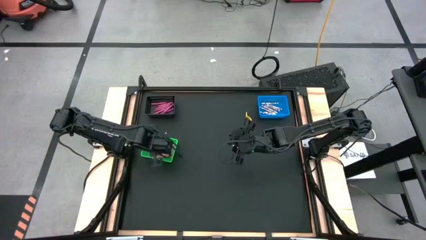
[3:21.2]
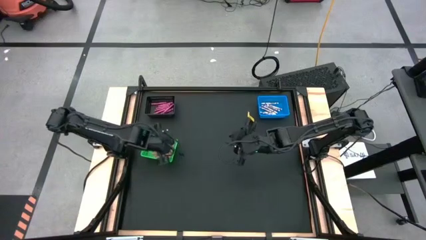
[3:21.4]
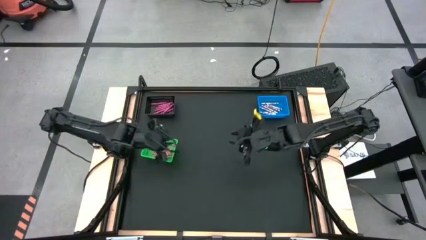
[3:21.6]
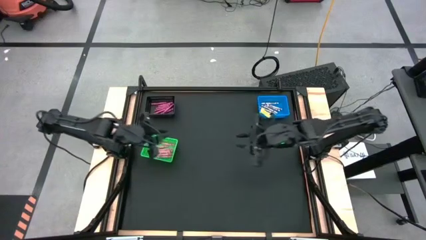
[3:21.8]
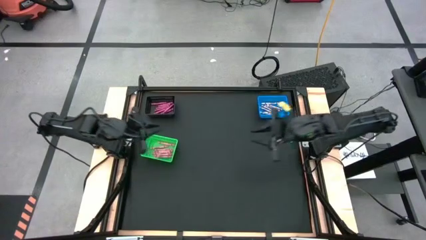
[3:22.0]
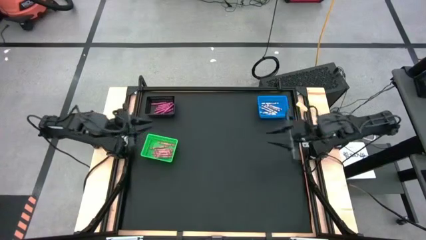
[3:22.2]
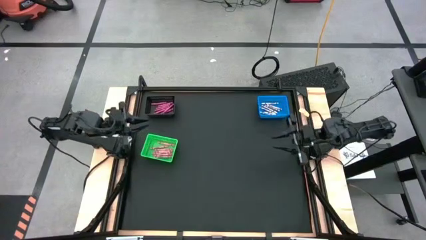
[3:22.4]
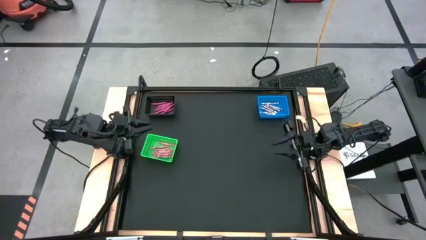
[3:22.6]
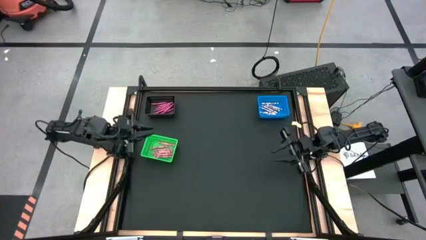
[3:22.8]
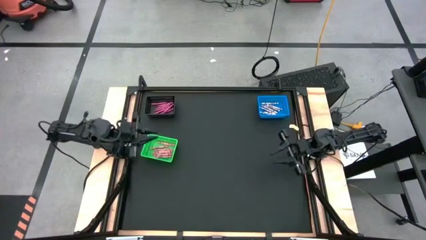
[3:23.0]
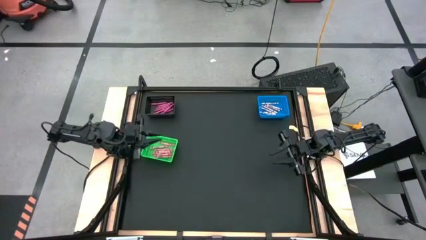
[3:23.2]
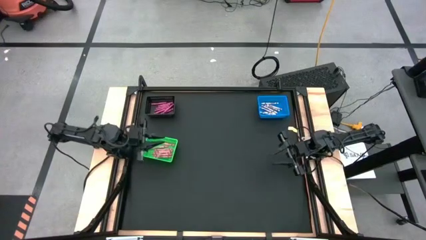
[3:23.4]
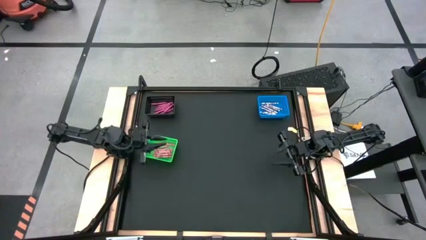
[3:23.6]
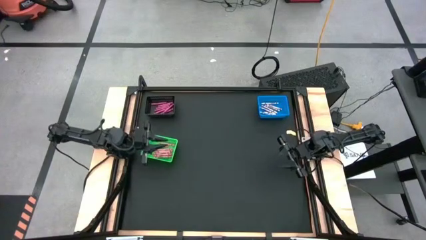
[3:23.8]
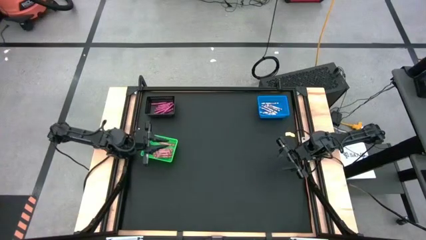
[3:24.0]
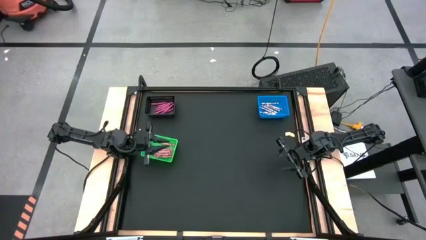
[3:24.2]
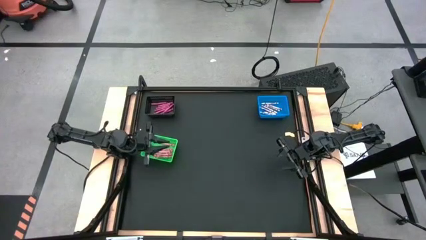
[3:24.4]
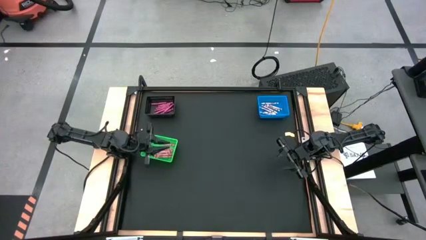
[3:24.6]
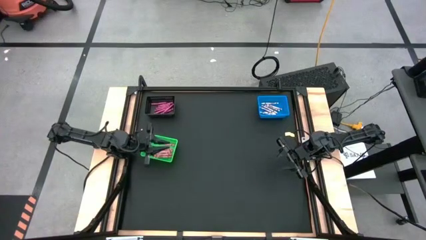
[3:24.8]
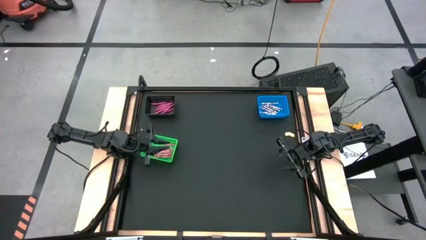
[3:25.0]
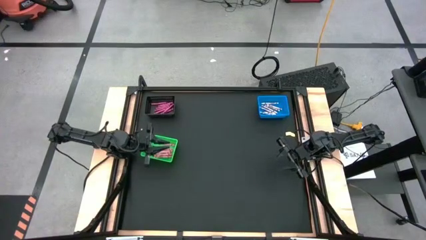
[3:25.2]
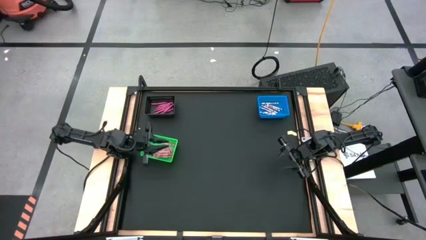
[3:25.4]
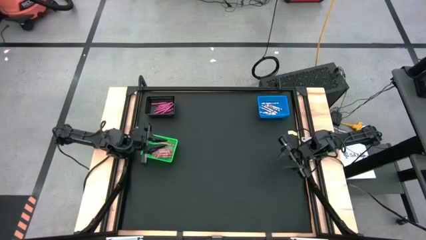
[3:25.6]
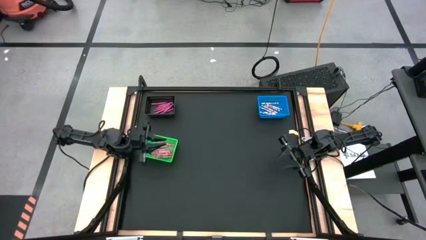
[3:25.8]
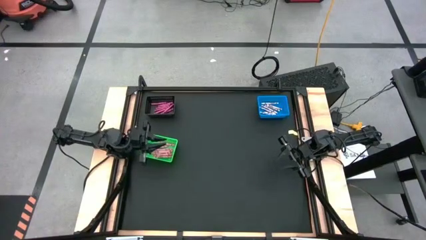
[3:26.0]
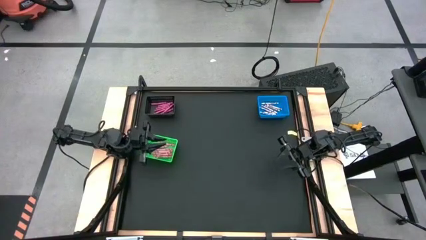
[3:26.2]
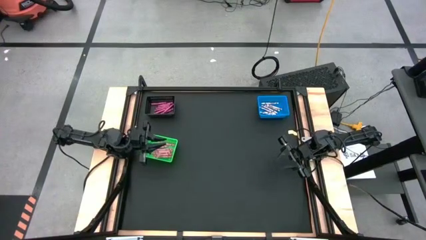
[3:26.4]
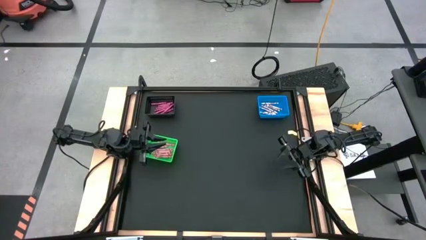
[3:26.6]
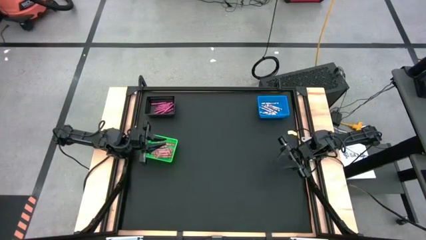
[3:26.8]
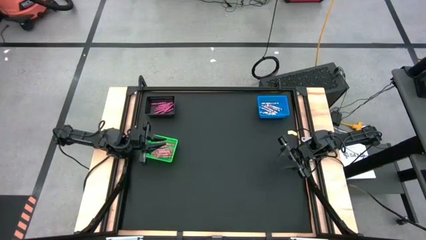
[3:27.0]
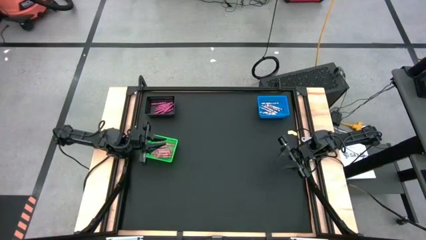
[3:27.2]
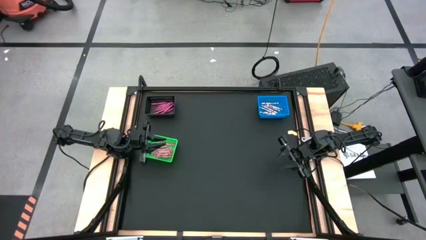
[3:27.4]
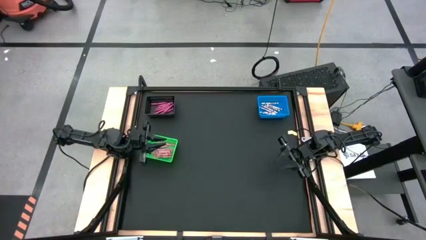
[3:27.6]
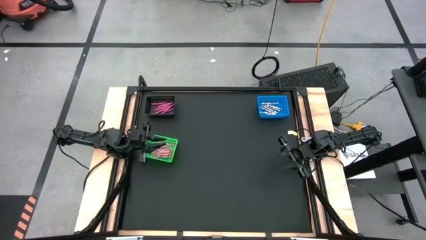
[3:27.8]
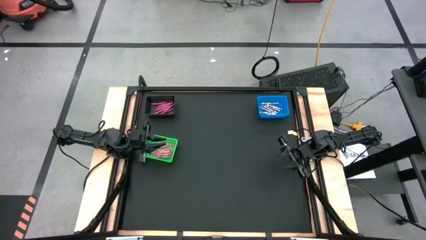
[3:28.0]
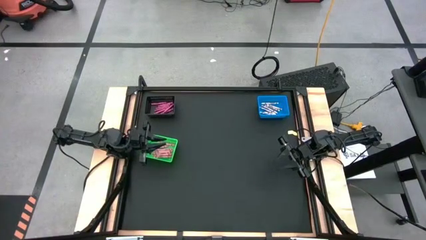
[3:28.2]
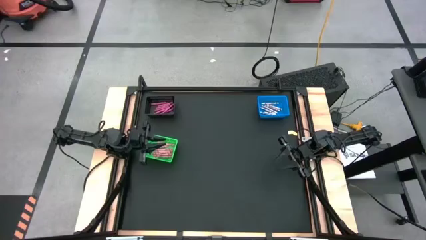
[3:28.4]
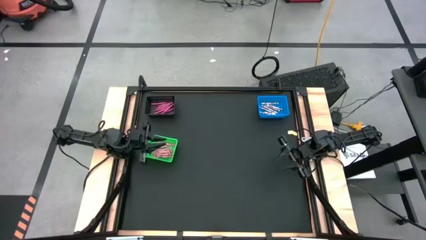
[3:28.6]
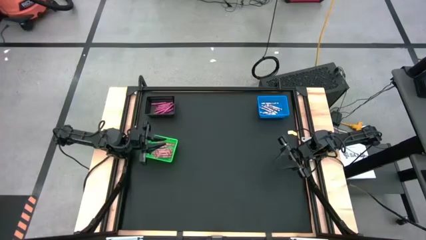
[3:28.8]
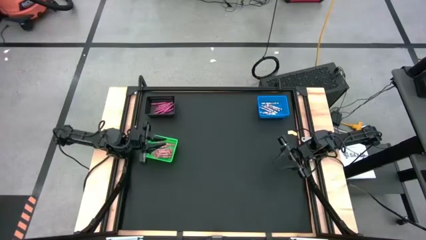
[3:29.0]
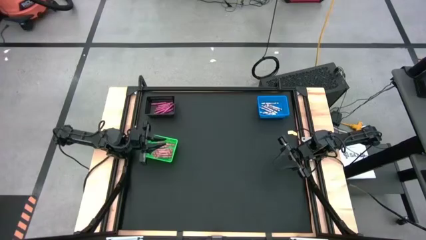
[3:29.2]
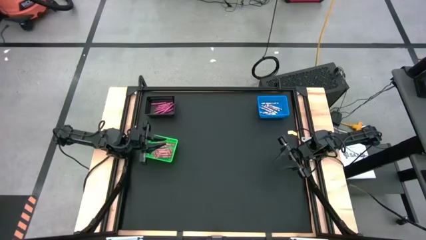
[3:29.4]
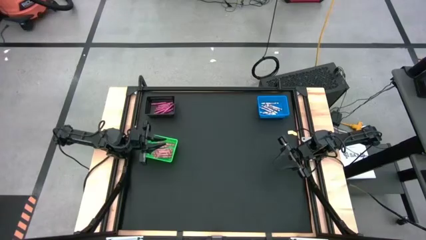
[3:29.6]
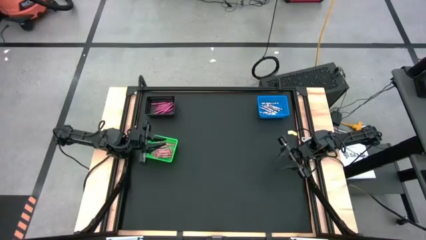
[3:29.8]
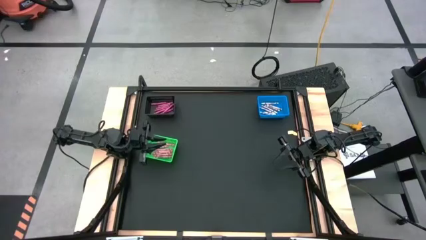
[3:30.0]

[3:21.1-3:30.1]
Task: Sort crayons
Return to Home Position

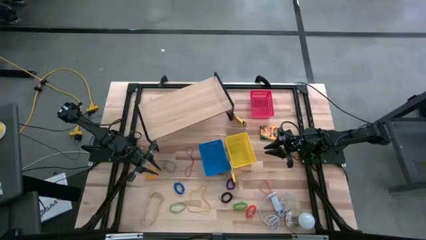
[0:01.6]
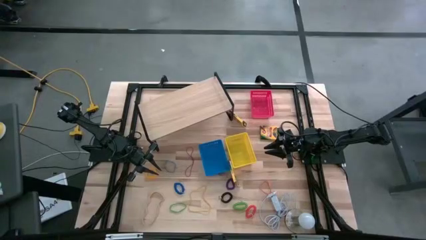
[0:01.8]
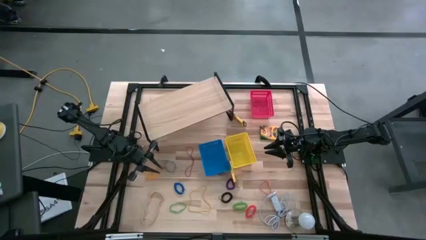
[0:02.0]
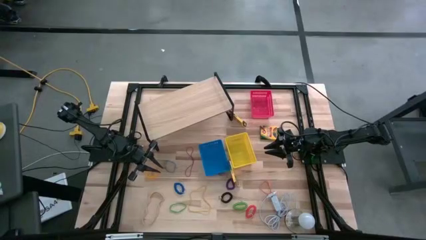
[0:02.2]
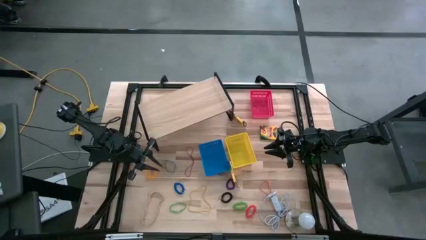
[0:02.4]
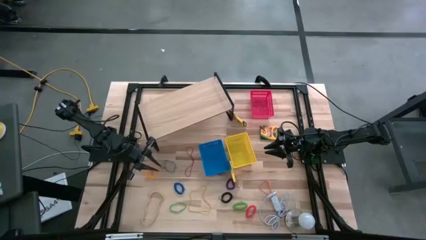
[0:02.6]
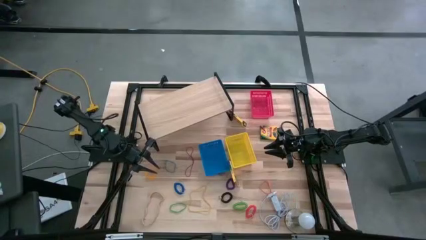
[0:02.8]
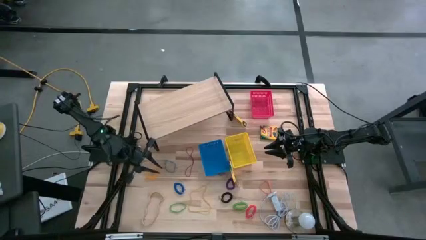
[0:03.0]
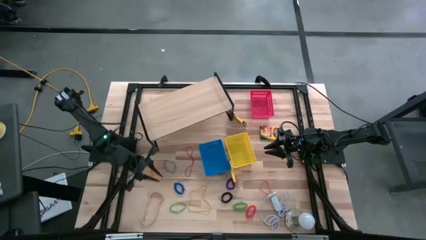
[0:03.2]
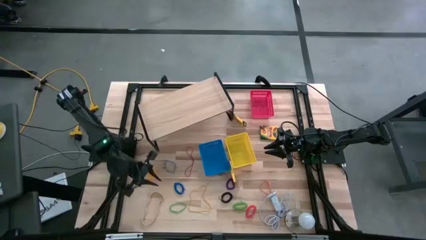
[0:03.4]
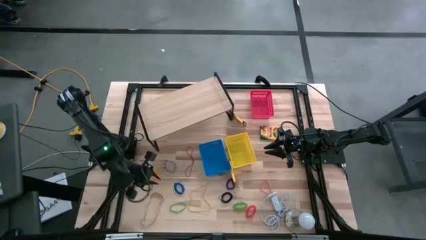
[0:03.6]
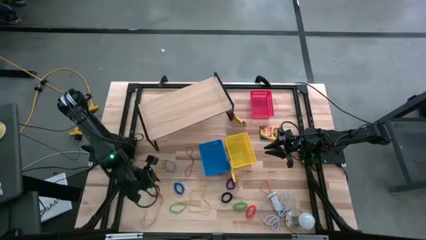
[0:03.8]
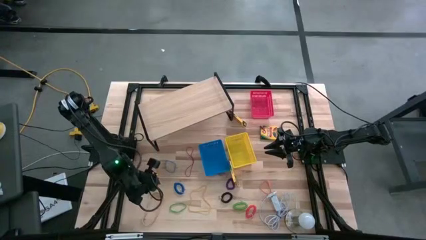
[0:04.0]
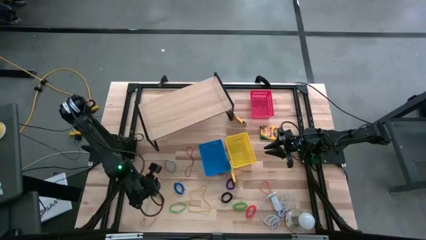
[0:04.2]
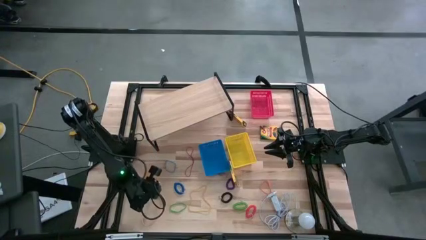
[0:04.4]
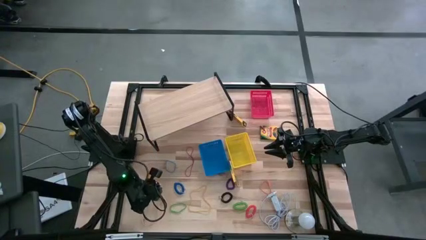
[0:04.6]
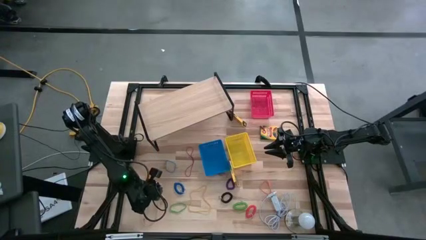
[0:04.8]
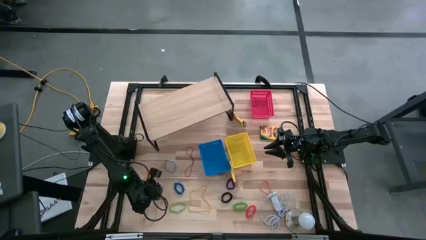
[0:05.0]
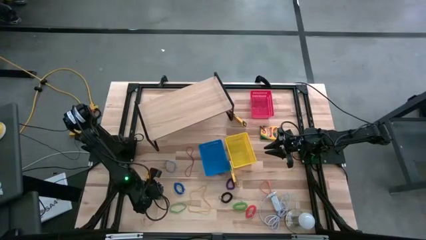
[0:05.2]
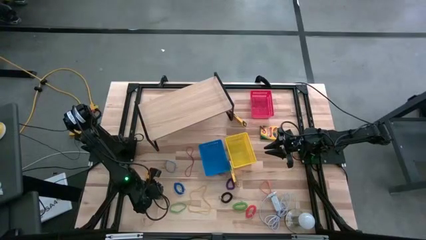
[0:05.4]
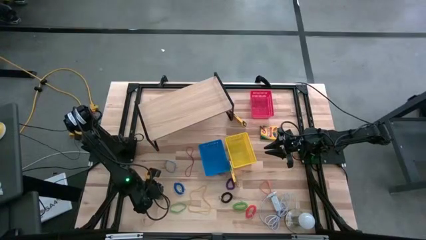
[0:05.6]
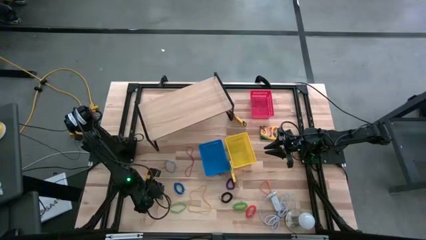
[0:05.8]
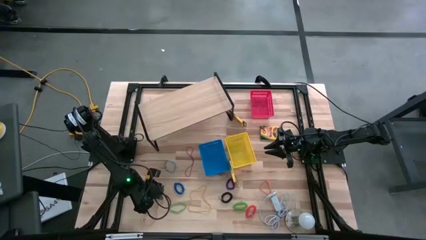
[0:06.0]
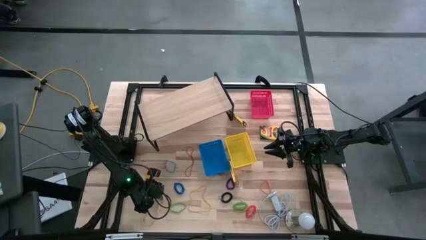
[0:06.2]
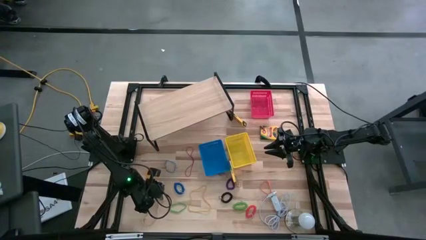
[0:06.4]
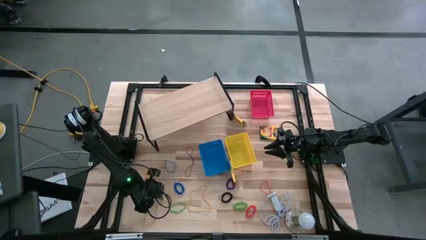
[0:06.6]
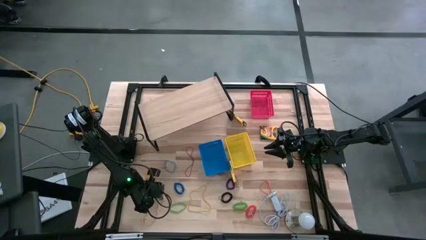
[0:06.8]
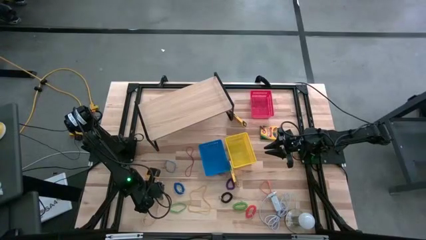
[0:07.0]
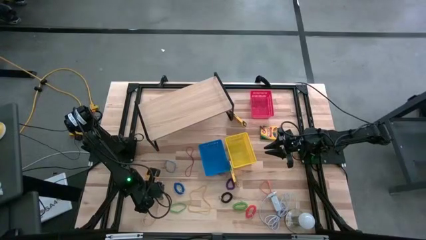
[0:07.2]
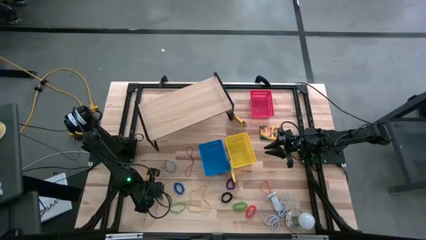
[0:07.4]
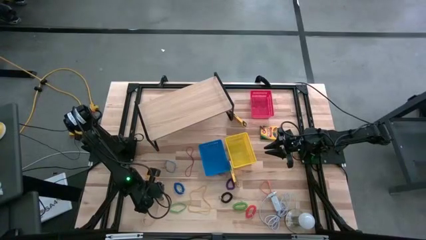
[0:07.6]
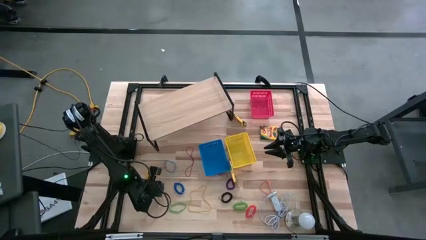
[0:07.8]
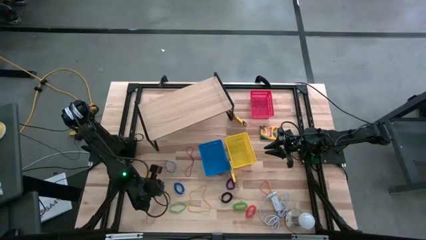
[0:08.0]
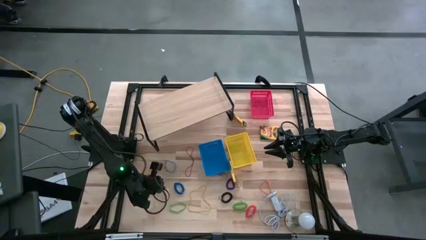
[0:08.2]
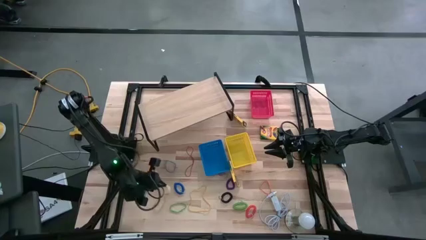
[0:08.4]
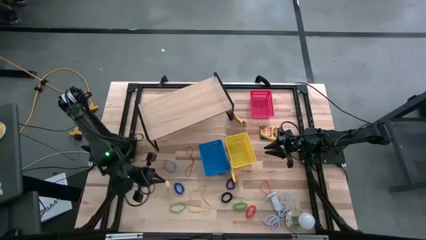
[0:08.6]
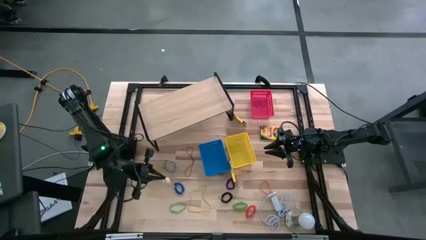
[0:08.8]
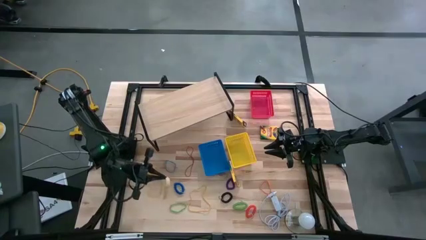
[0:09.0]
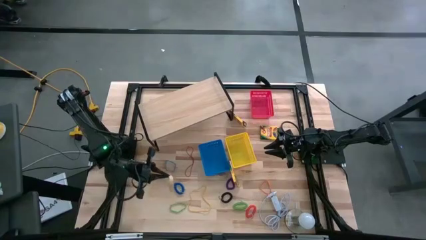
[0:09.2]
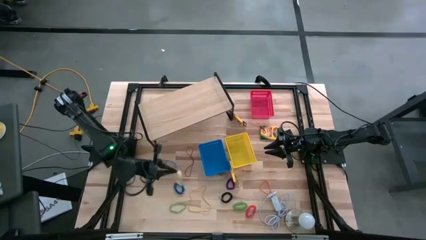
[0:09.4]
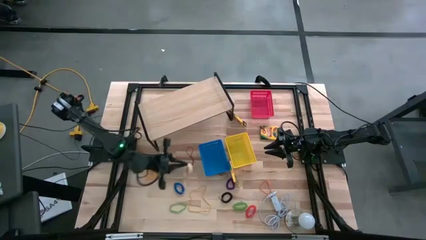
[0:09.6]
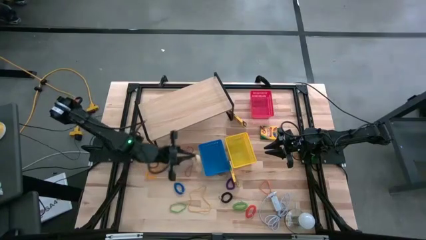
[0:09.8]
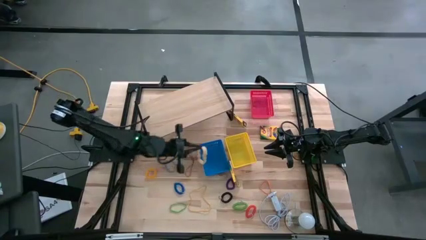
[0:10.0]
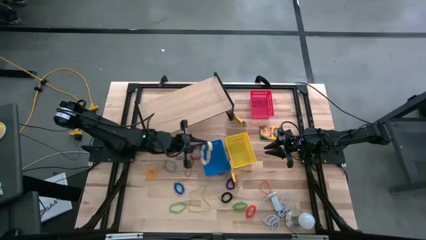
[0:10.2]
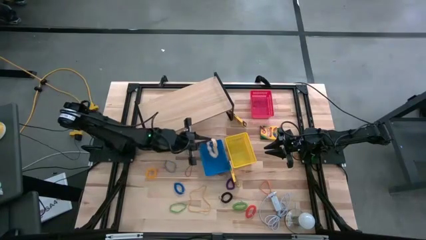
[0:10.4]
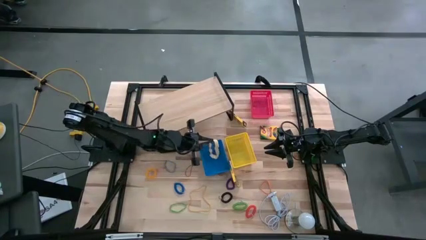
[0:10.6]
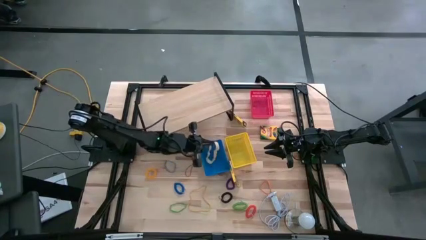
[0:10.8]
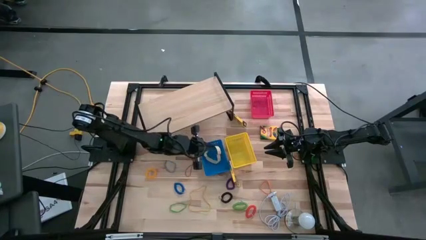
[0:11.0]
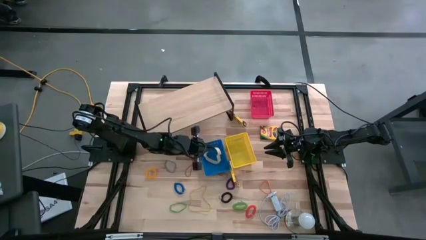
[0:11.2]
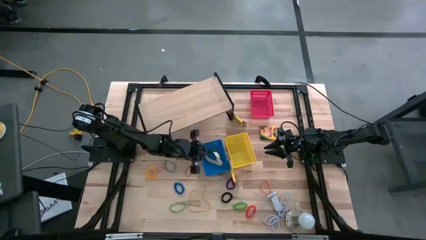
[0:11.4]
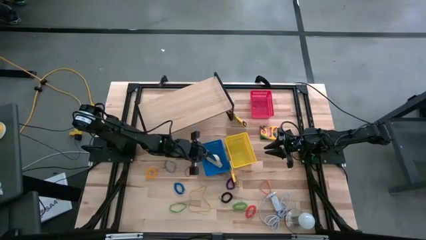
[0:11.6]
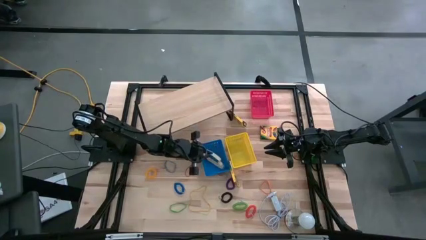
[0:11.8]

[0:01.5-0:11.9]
Task: Pick & Place Office Desk Supplies
Put the brown rubber band into the blue bin
